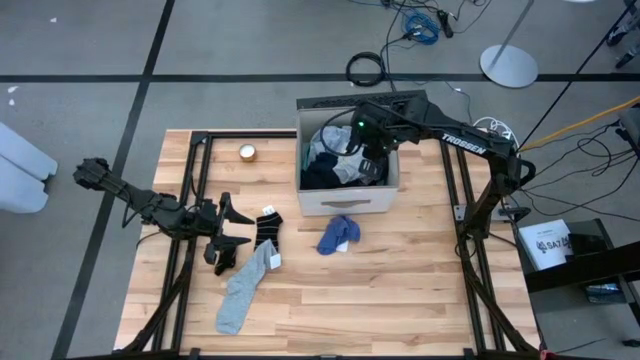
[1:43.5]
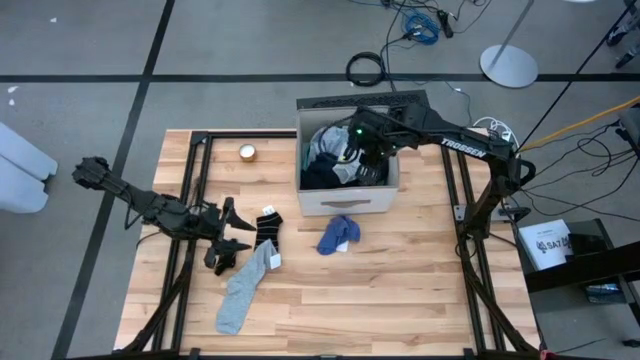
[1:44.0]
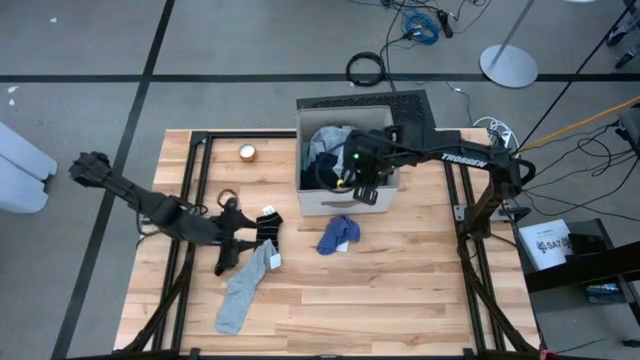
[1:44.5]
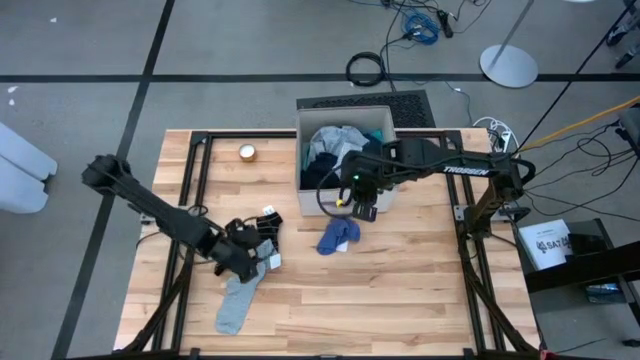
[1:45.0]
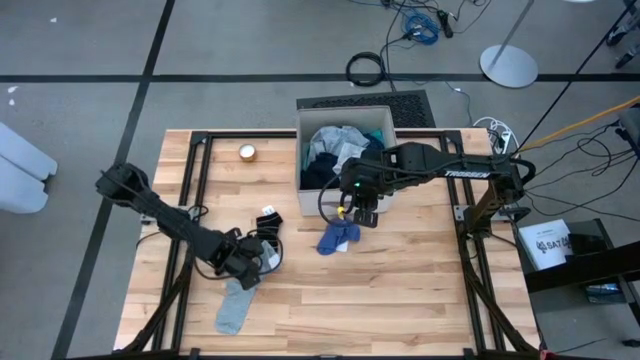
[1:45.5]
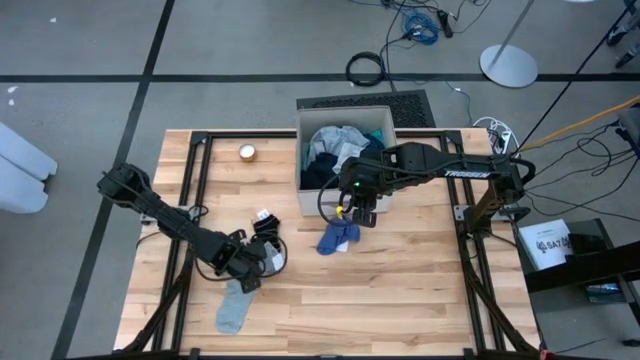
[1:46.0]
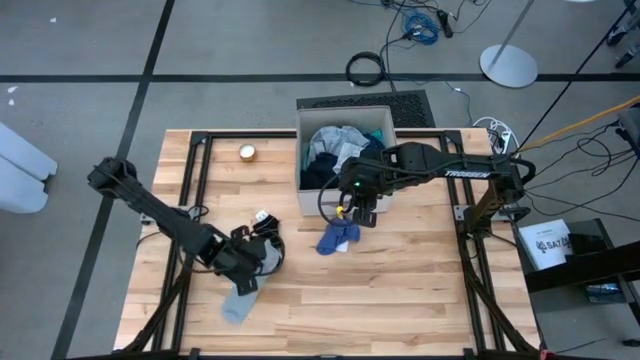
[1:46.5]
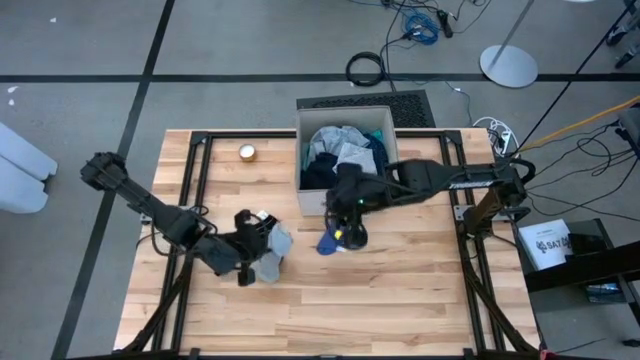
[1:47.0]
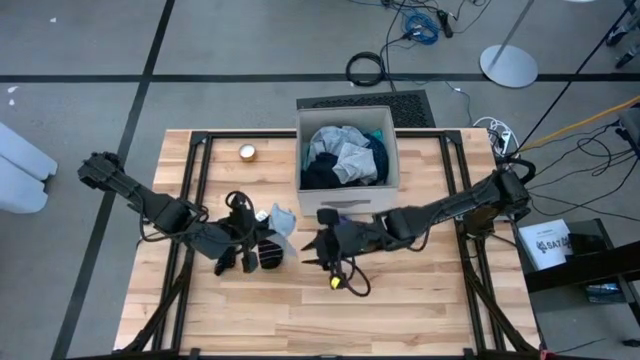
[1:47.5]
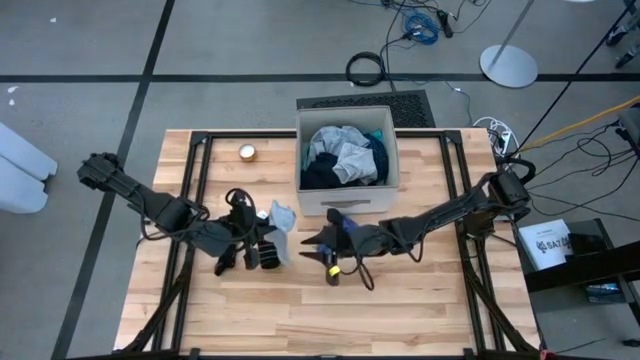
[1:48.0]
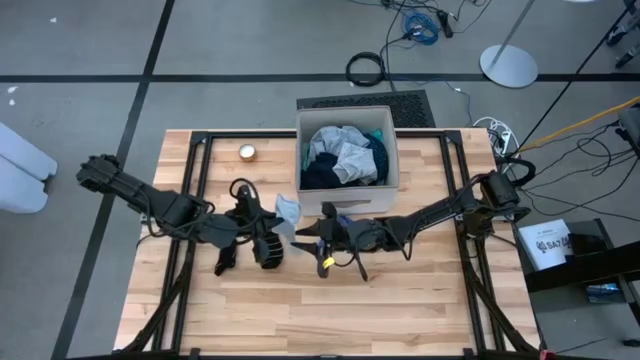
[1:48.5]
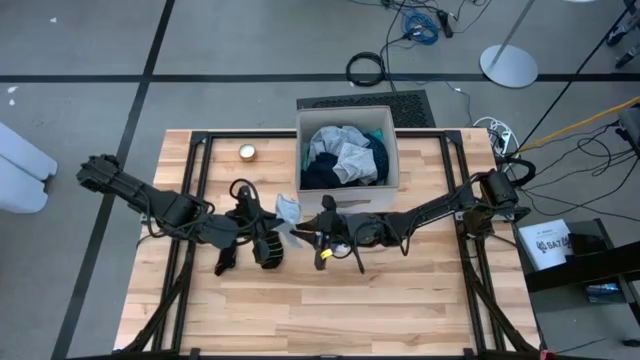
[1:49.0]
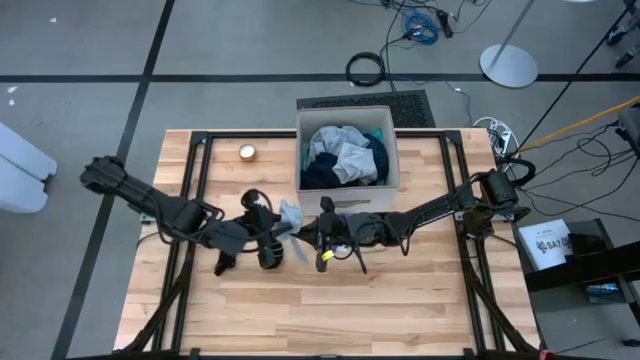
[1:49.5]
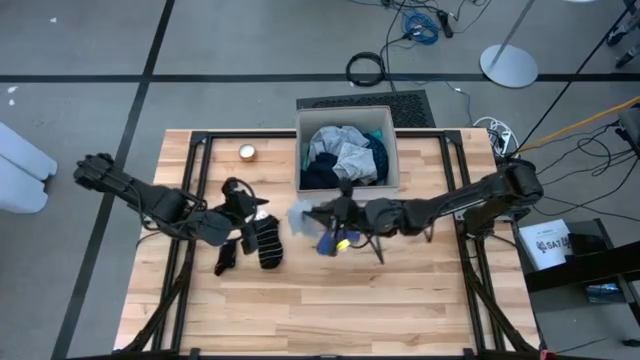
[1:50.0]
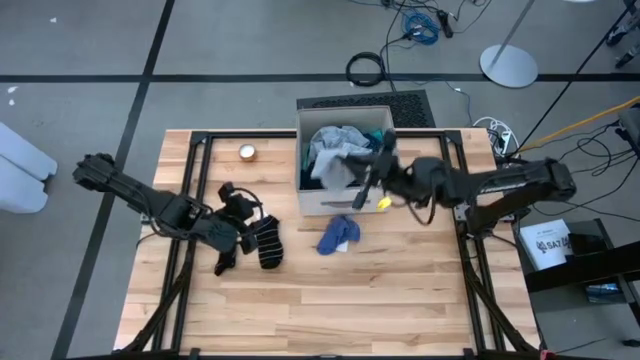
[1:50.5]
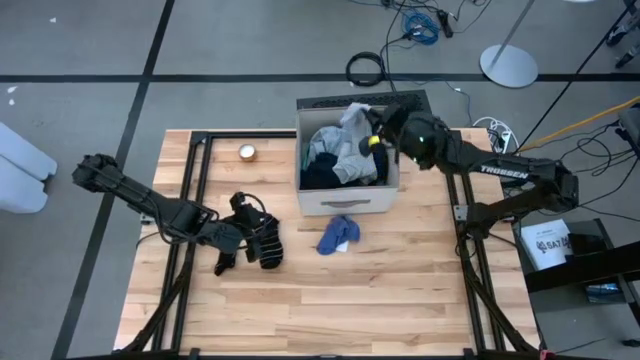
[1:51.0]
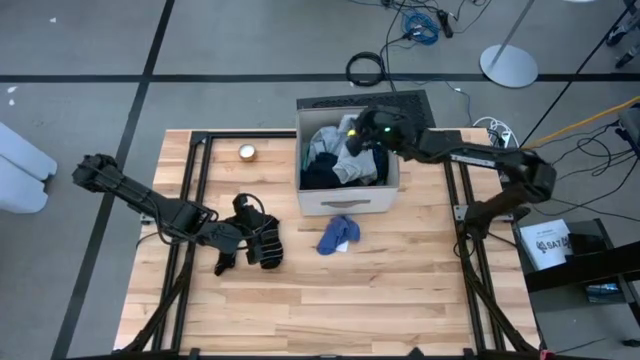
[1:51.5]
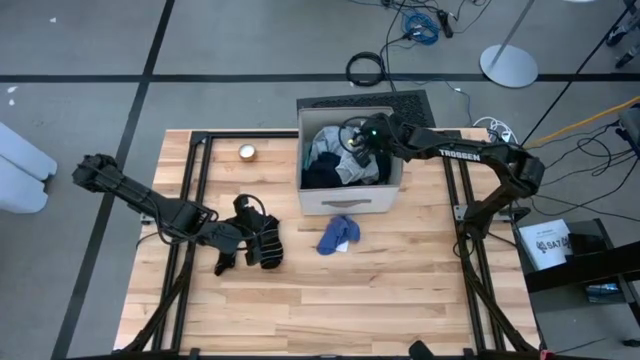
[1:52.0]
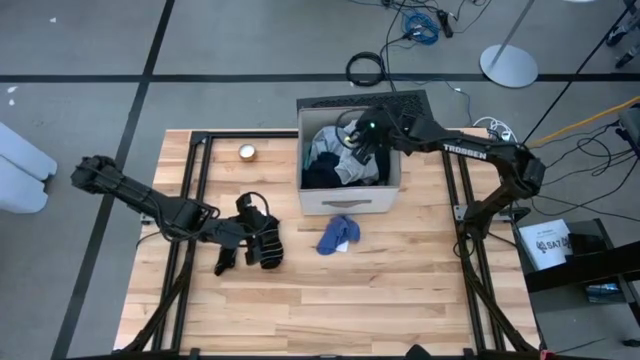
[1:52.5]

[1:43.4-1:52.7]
Task: Sort clothes
Put the gray sock into the laundry organizer

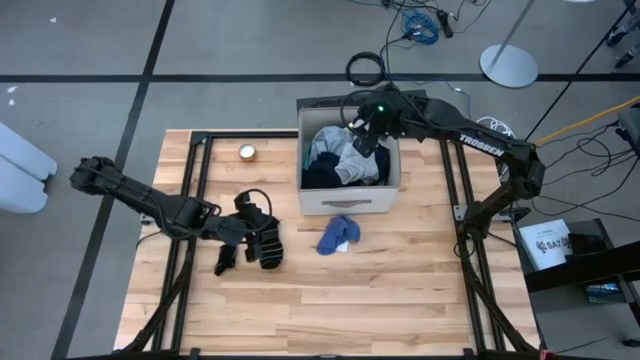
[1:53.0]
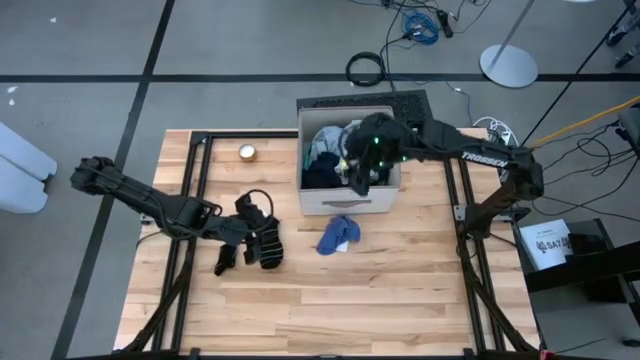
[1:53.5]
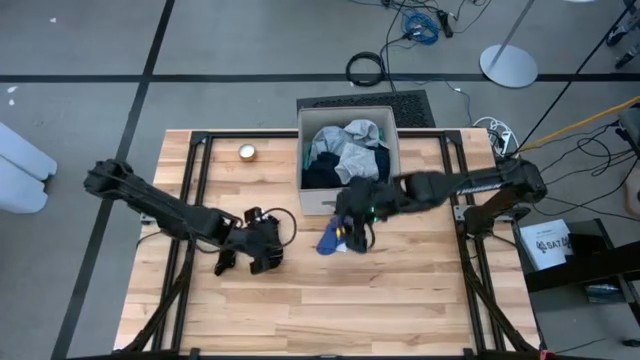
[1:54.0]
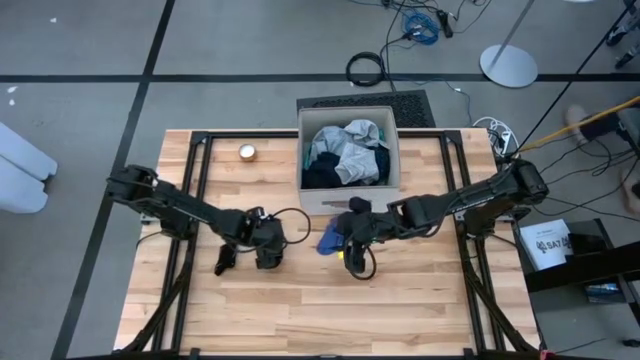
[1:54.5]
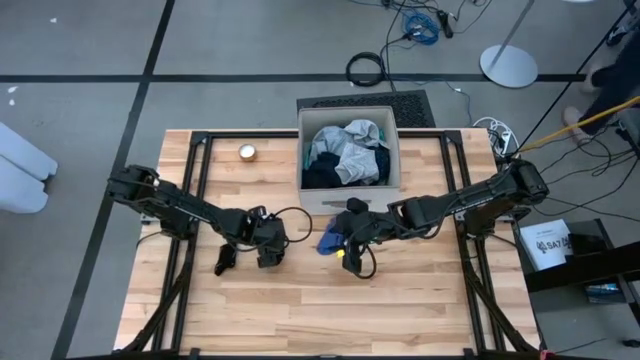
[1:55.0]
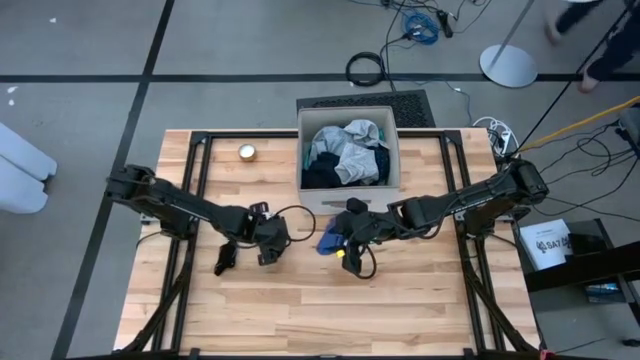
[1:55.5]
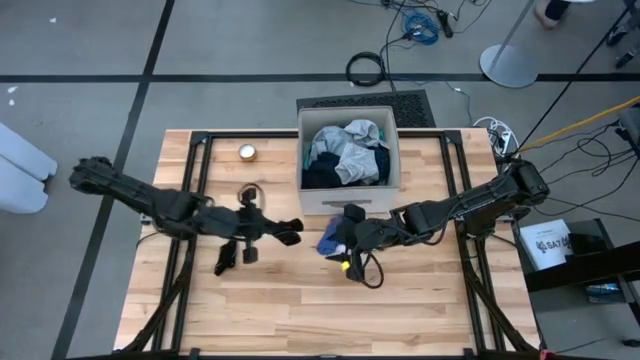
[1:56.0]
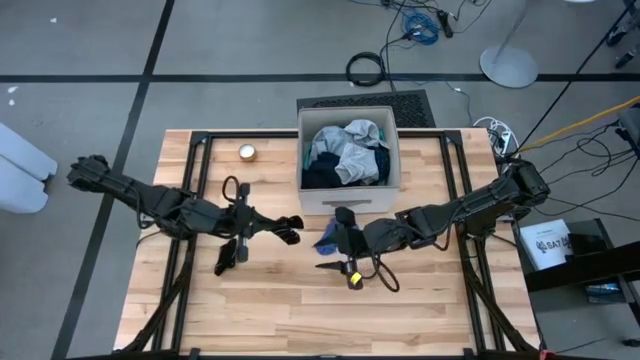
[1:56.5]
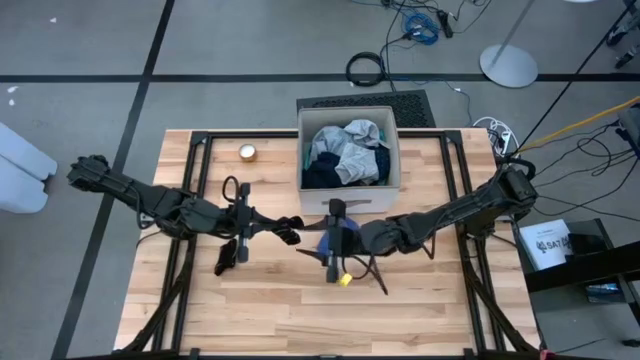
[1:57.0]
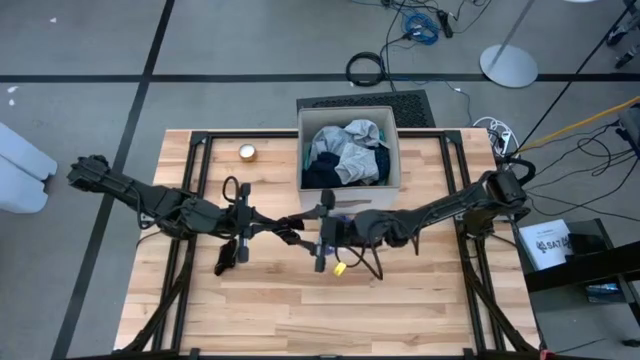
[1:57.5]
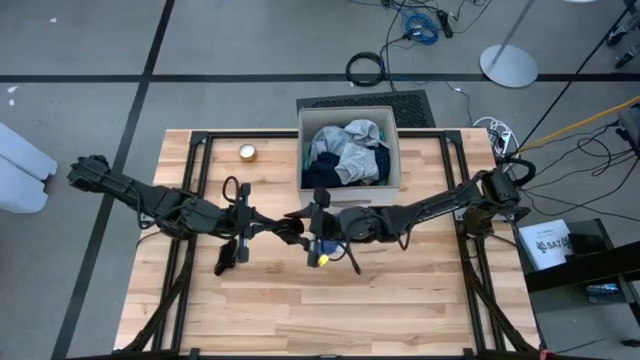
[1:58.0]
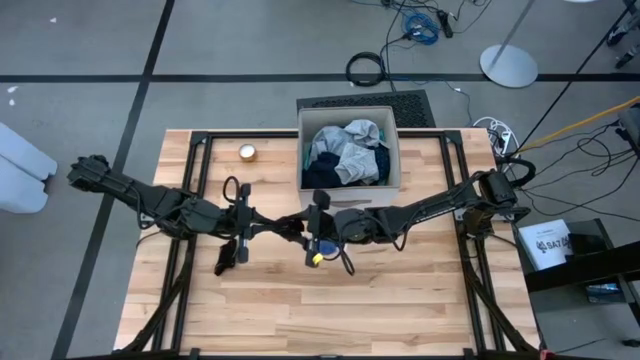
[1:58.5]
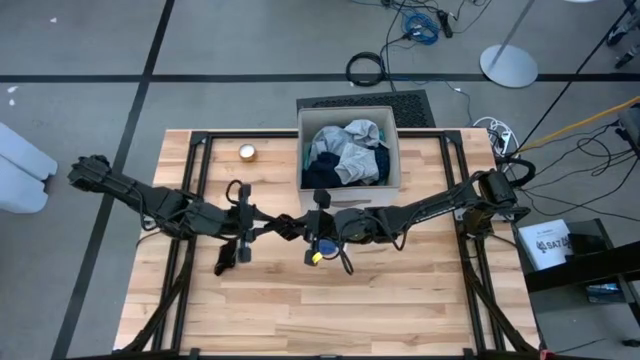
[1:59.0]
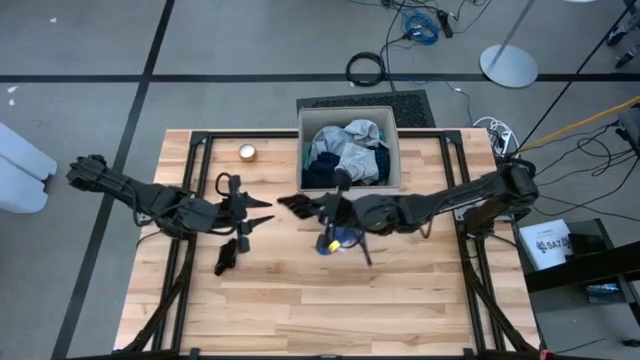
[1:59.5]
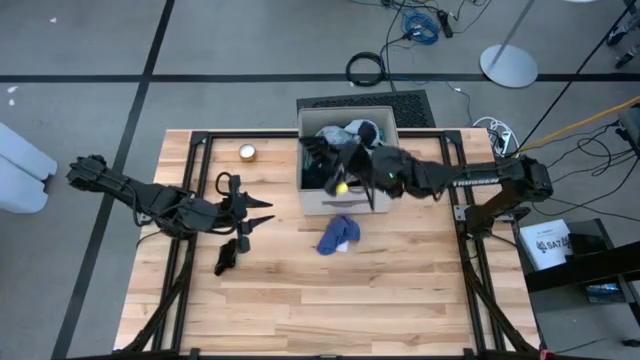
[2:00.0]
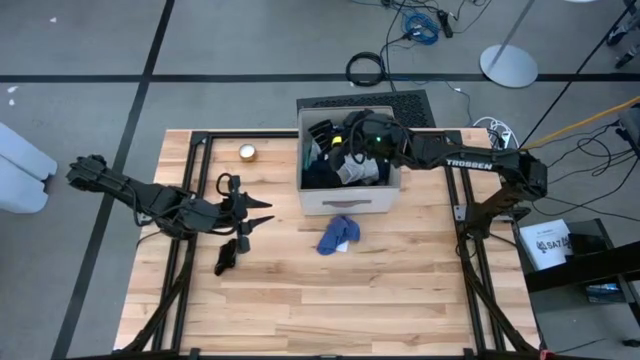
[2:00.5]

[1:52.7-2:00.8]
Put the black sock into the laundry organizer

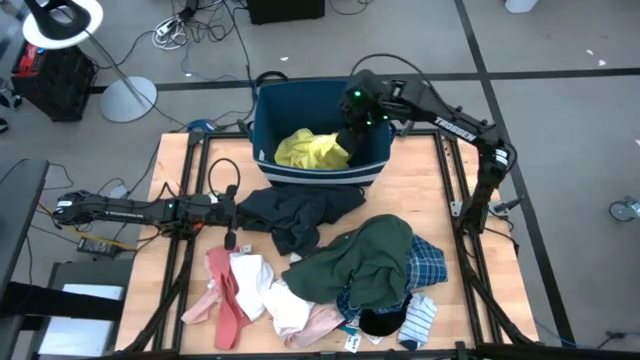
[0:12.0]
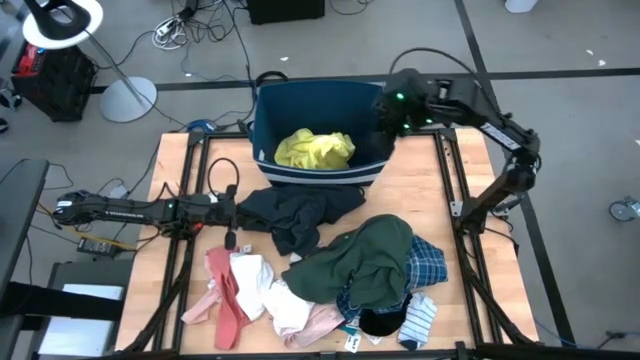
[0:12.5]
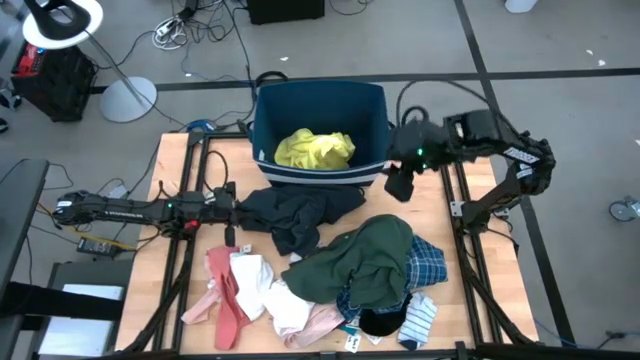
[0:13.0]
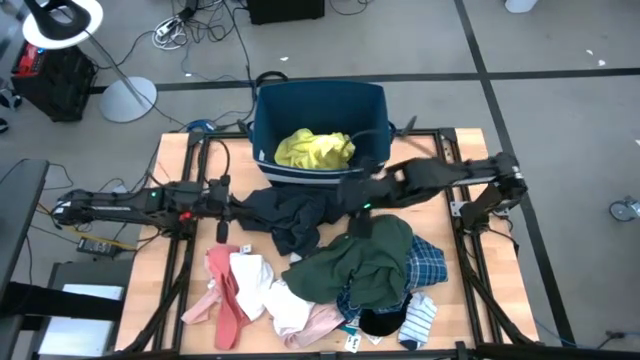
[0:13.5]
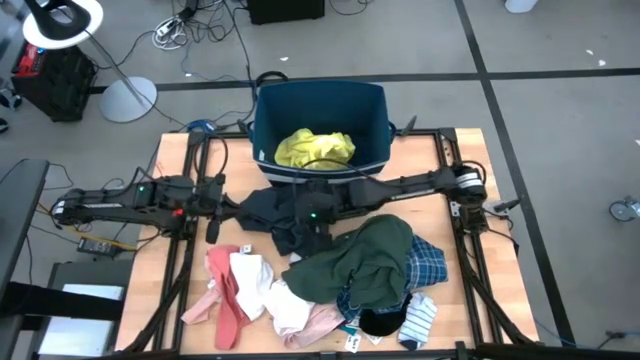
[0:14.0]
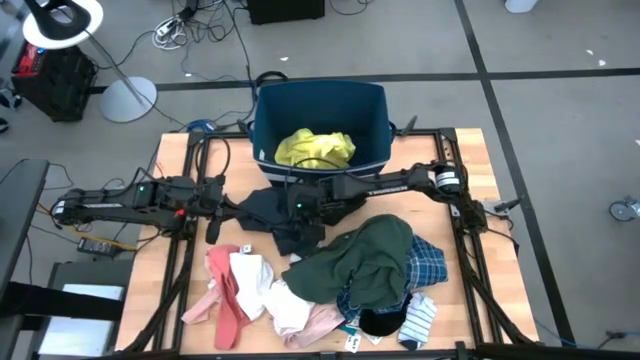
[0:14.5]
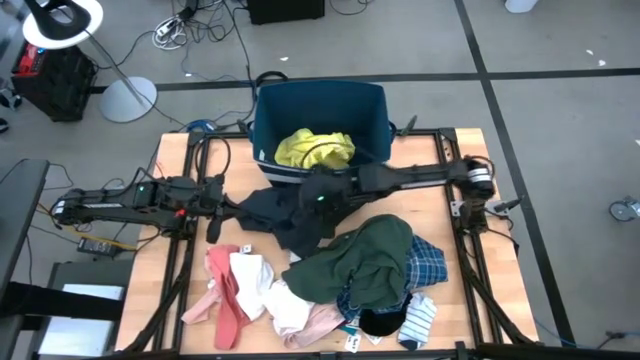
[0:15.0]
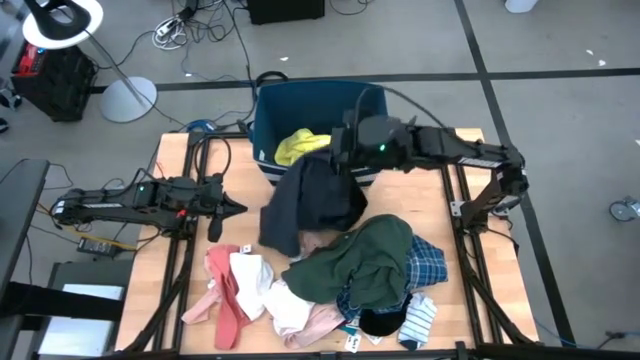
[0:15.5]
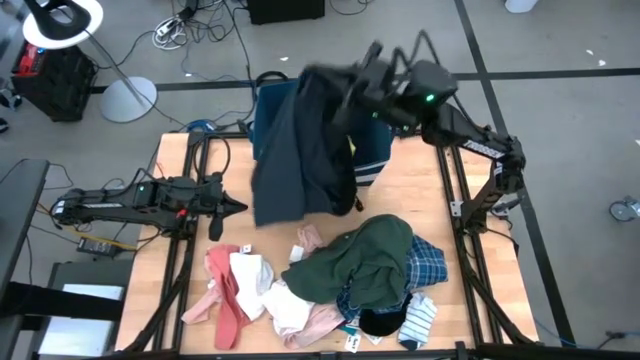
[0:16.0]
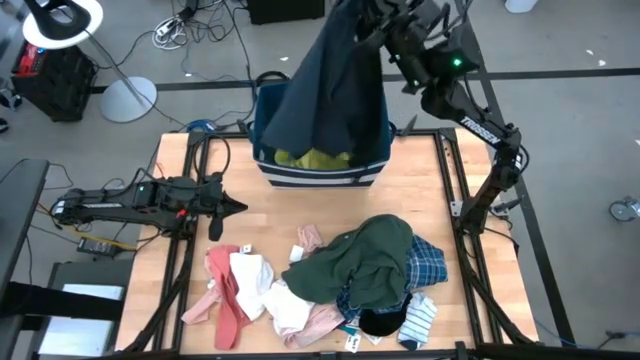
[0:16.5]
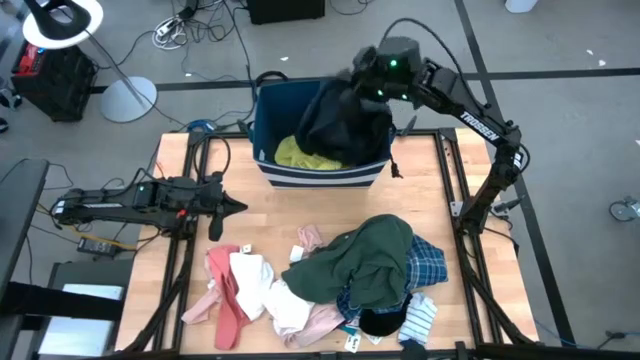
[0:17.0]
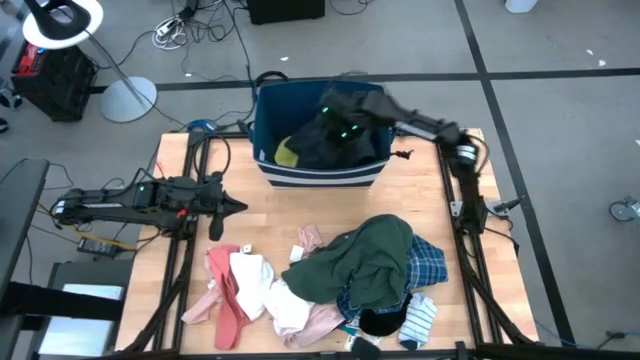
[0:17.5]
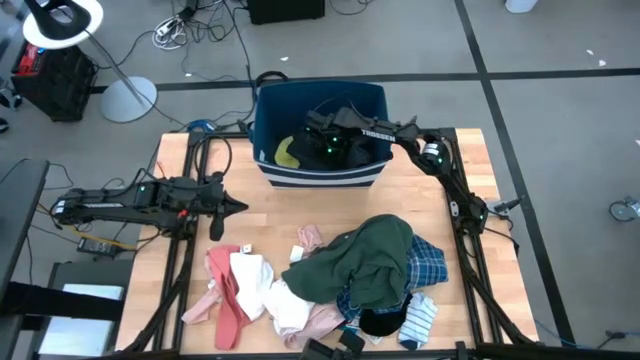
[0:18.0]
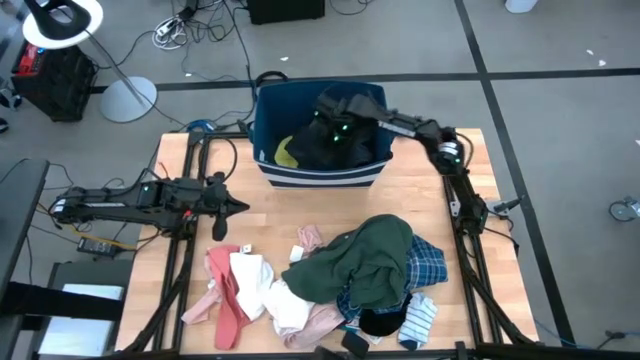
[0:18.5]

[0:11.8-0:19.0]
Task: Sort clothes
Put the top black short into the blue laundry organizer
